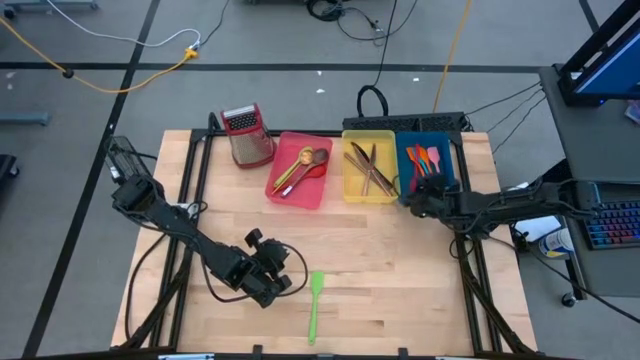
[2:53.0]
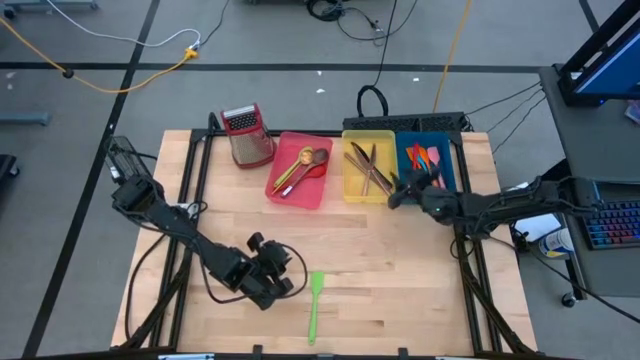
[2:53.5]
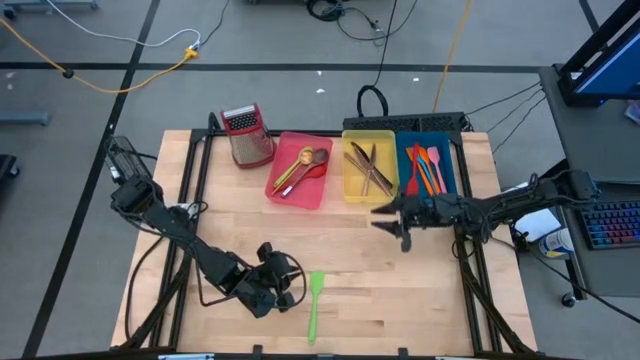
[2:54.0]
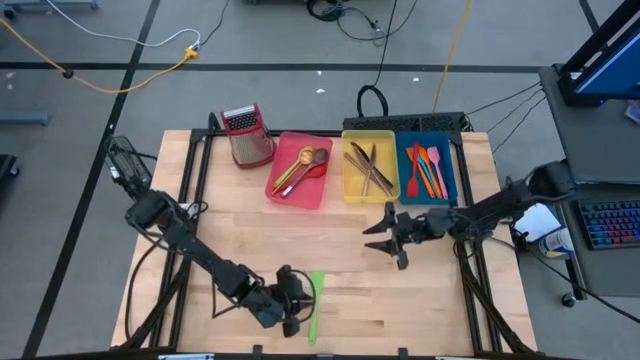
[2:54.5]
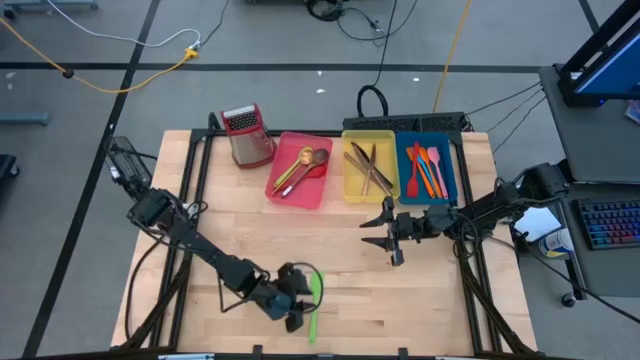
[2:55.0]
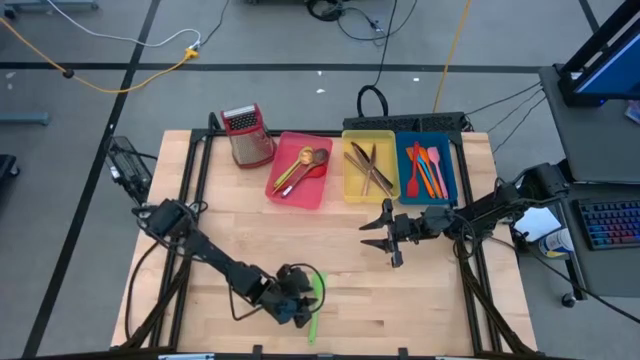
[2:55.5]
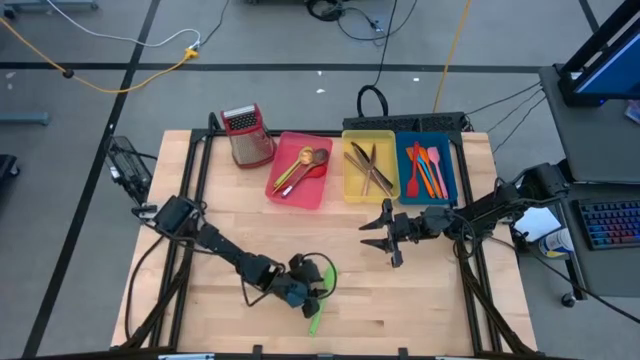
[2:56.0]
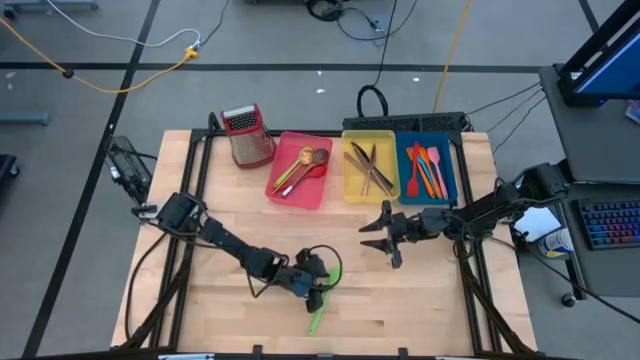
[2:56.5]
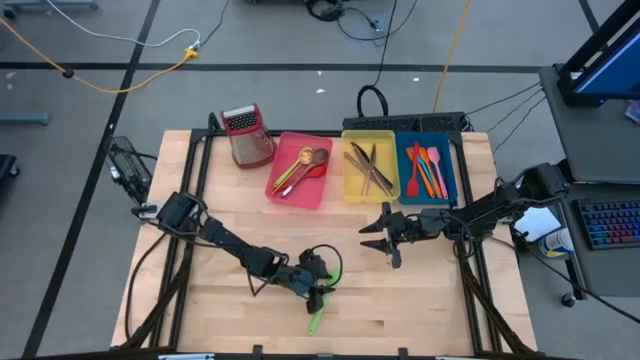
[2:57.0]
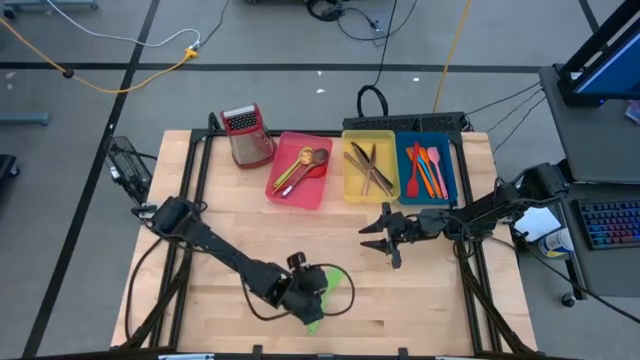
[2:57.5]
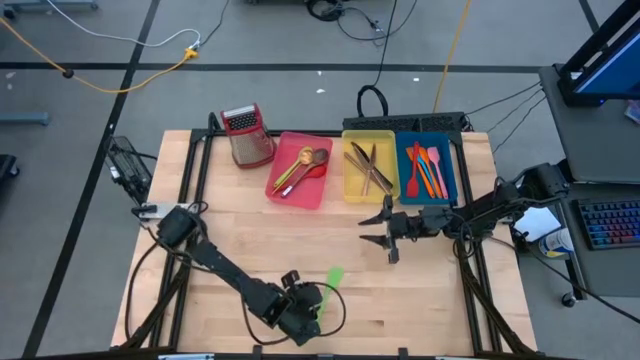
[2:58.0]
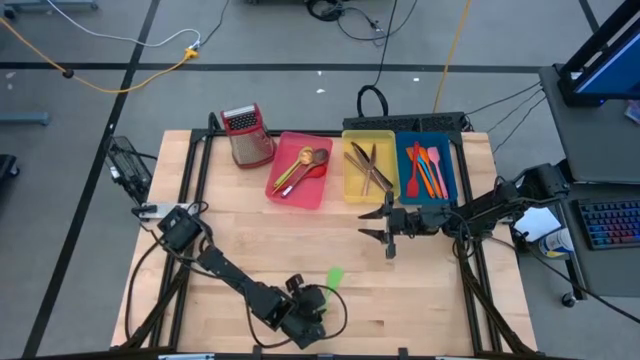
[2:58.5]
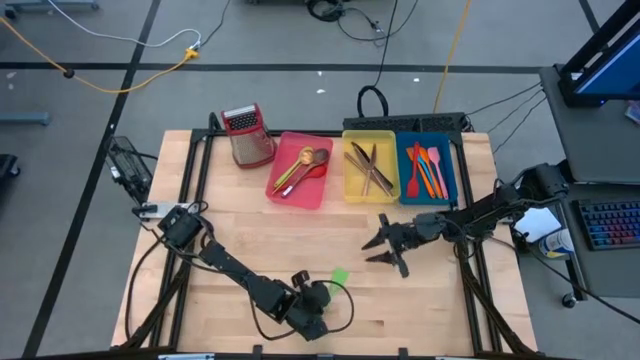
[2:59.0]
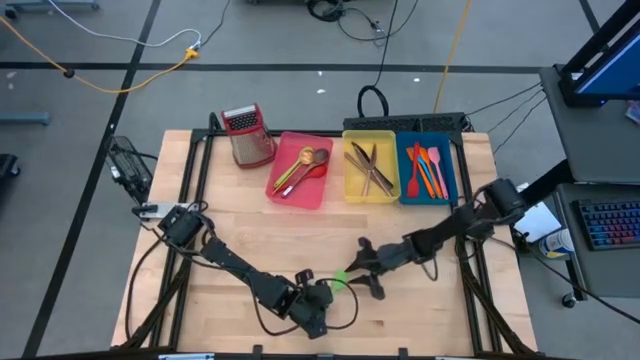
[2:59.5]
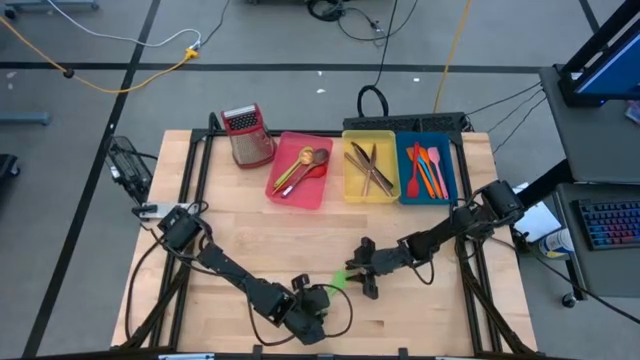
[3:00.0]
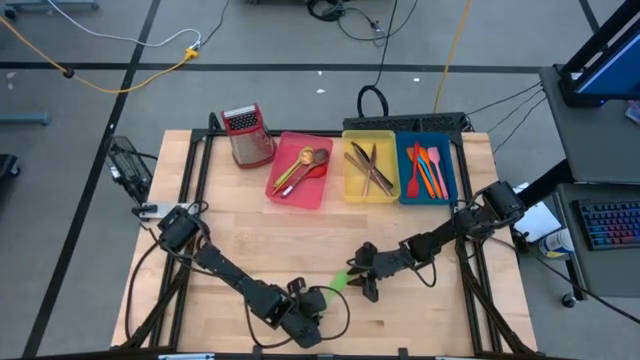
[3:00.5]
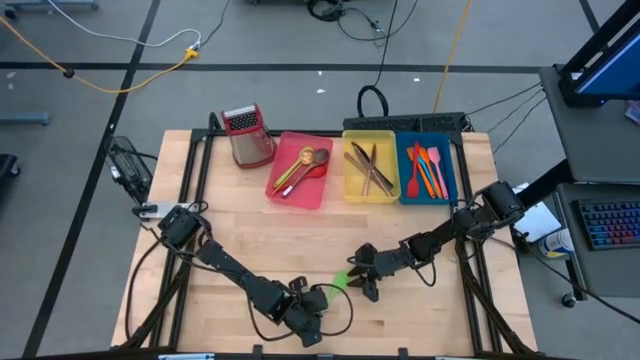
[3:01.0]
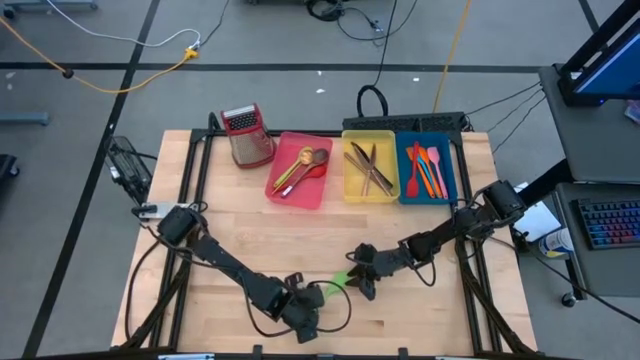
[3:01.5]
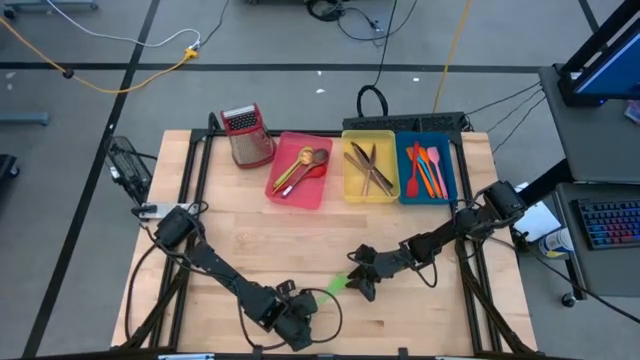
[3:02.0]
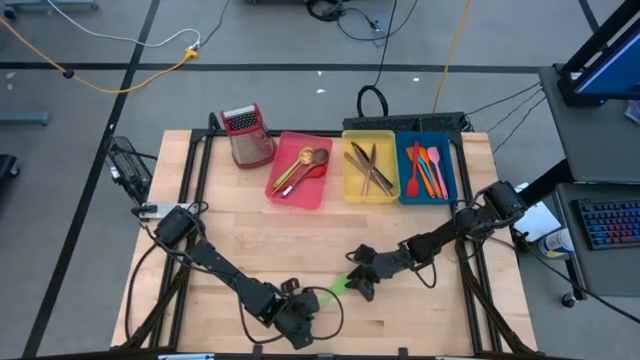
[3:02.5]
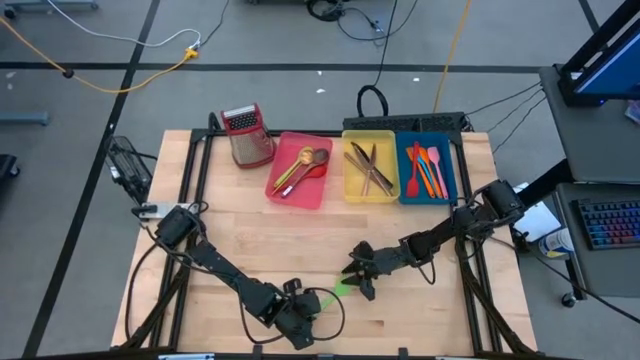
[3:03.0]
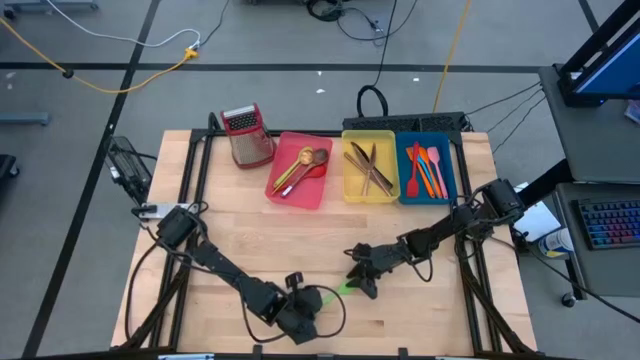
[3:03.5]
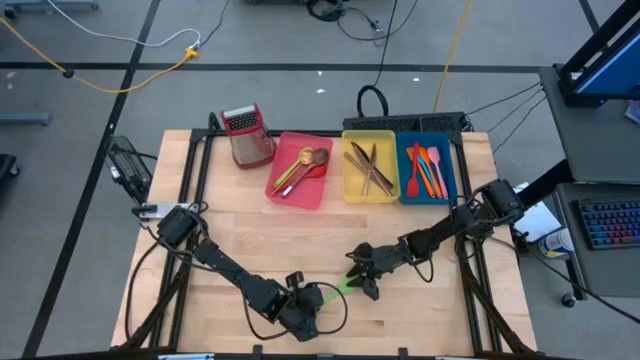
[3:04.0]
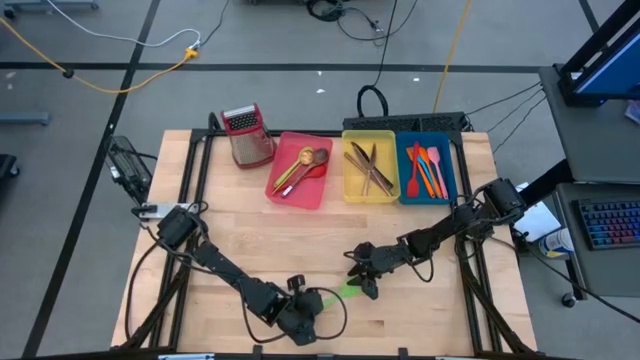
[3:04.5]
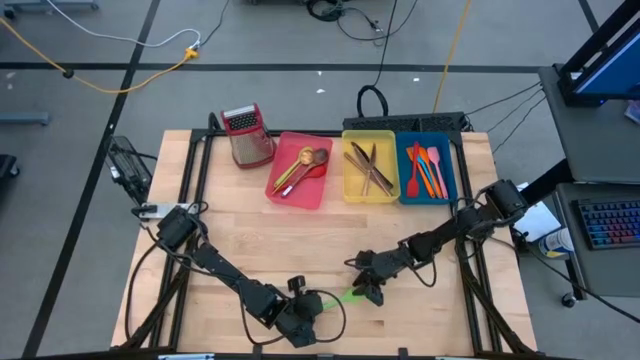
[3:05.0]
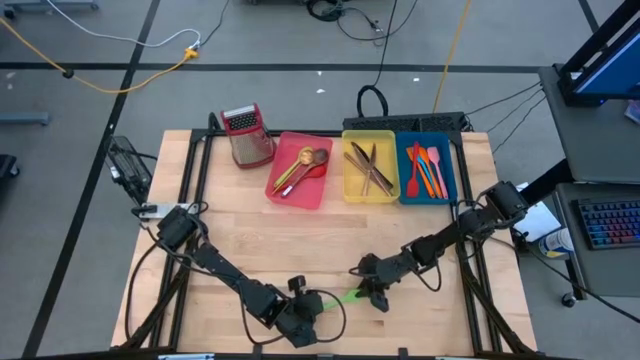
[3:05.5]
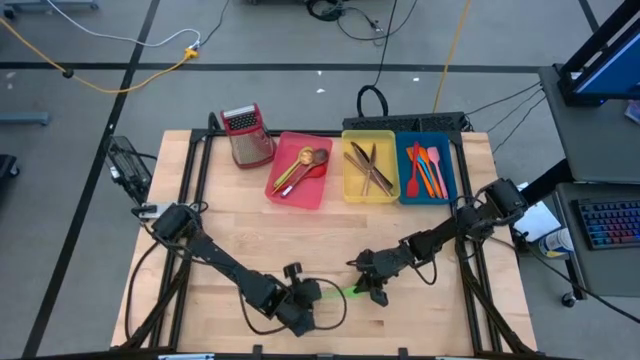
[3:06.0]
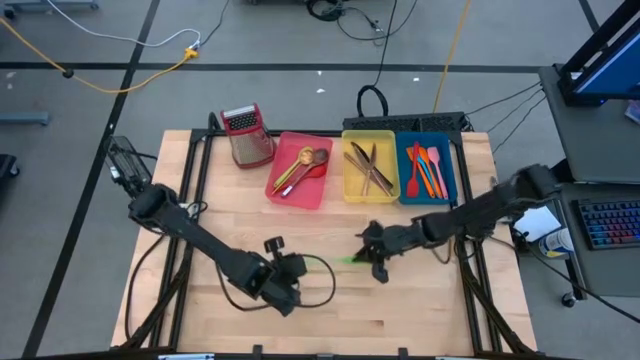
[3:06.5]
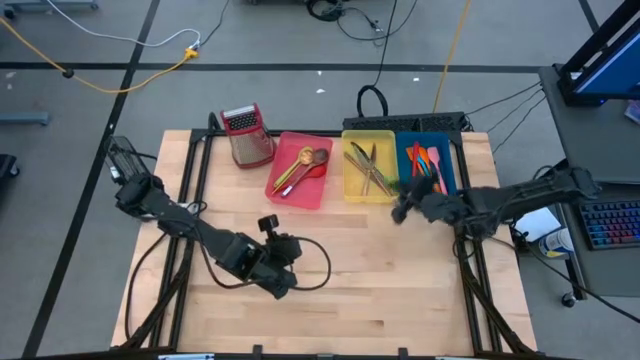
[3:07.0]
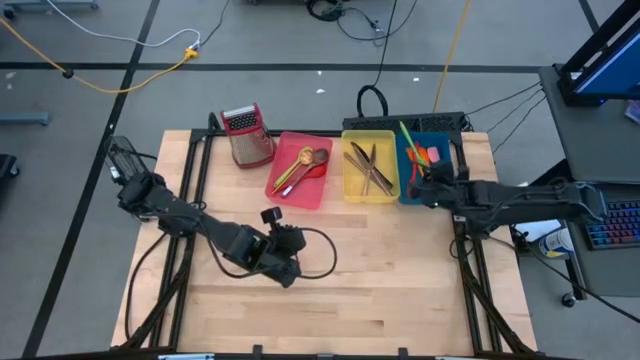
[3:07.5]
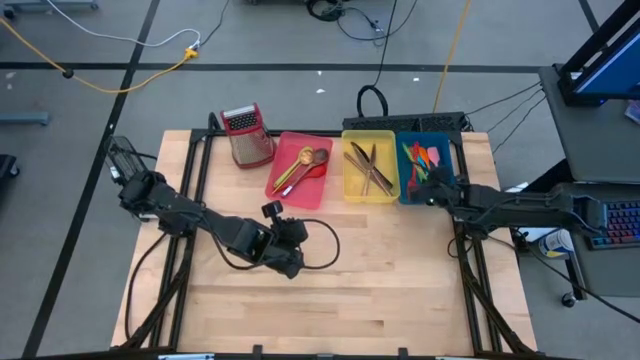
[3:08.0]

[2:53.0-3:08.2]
Task: Pick & Place Kitchen Items
Put the green serving spoon into the blue bin

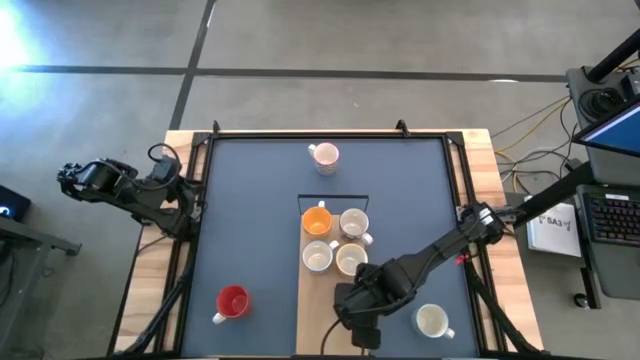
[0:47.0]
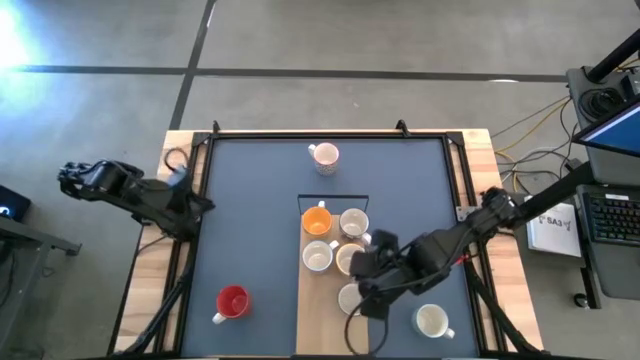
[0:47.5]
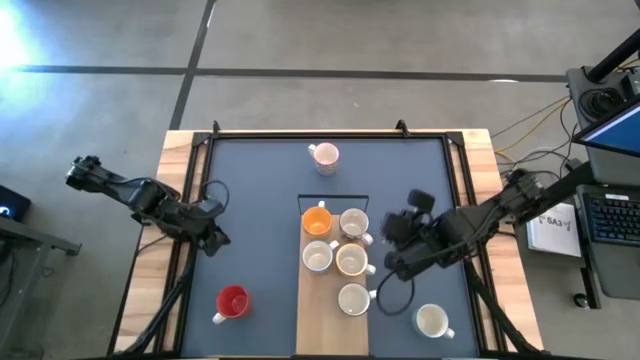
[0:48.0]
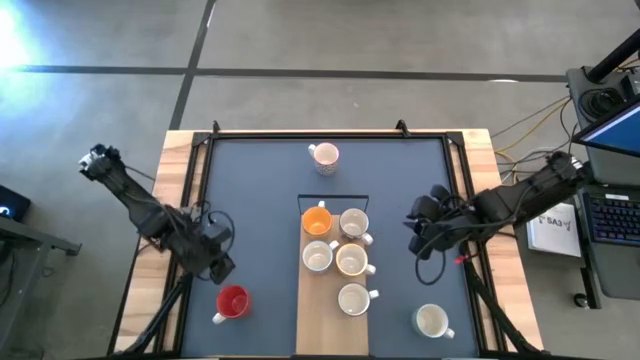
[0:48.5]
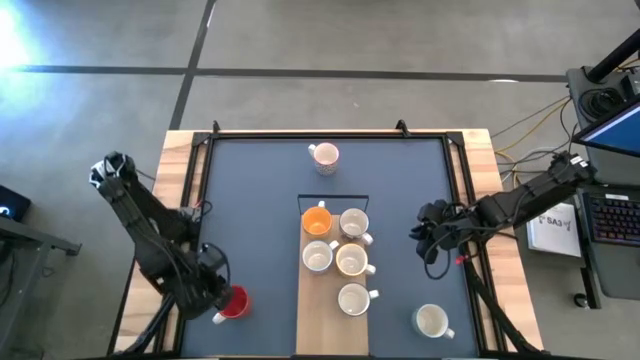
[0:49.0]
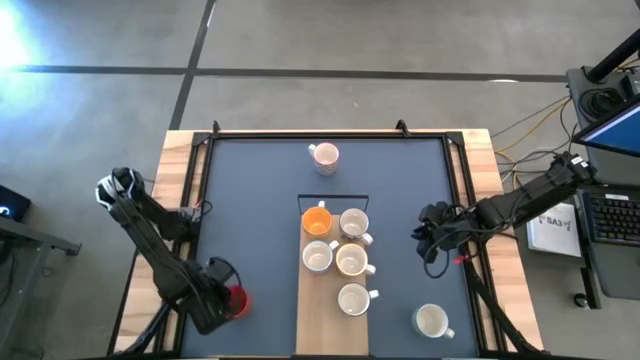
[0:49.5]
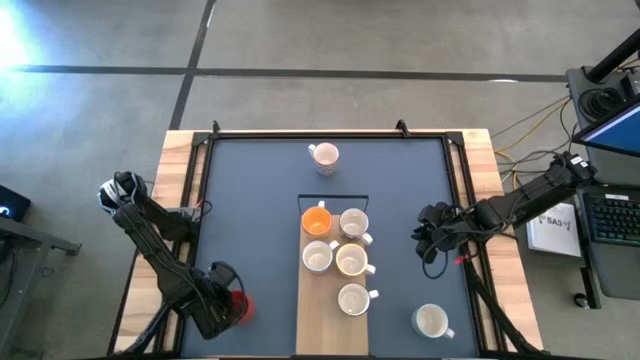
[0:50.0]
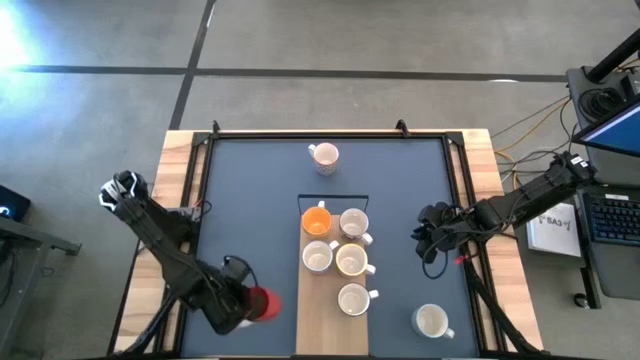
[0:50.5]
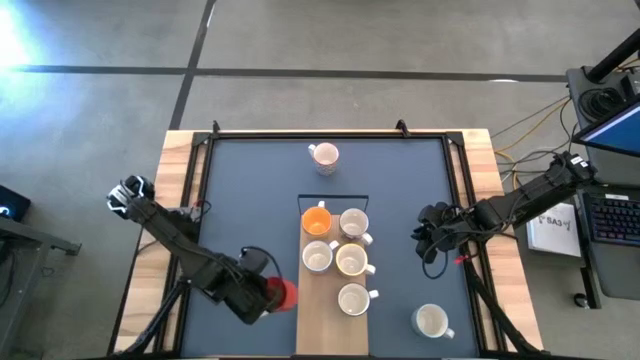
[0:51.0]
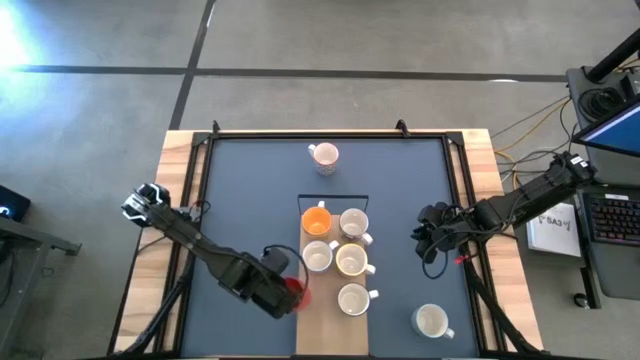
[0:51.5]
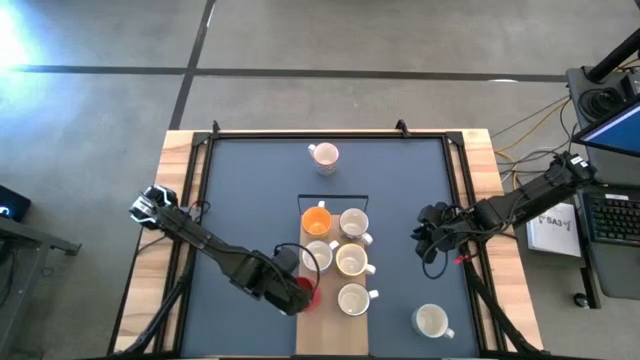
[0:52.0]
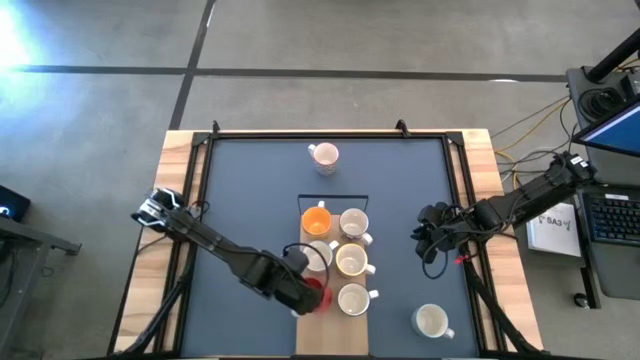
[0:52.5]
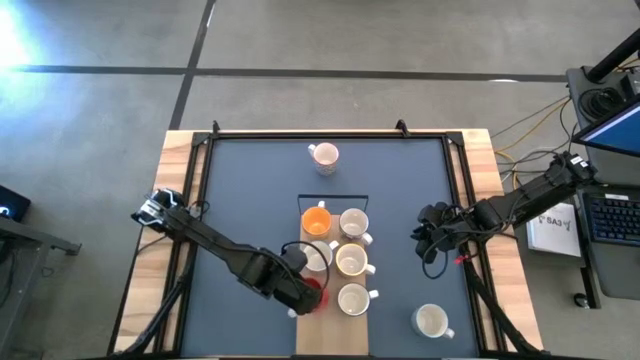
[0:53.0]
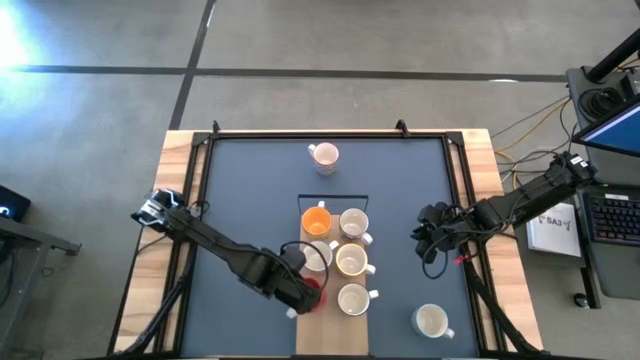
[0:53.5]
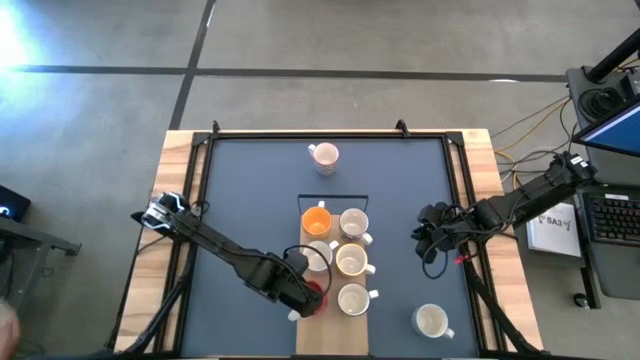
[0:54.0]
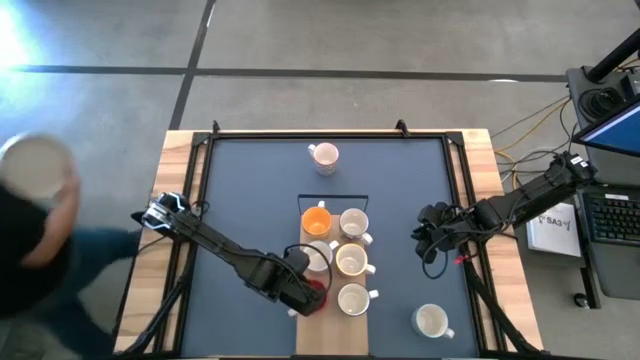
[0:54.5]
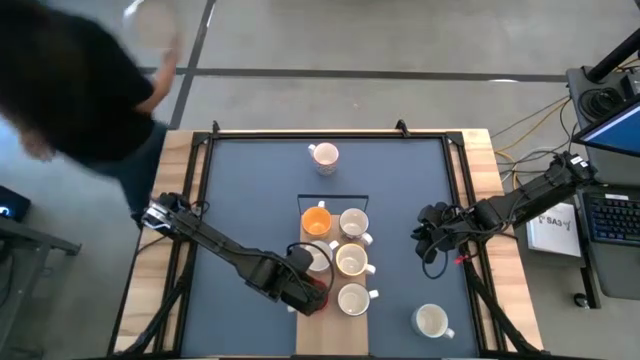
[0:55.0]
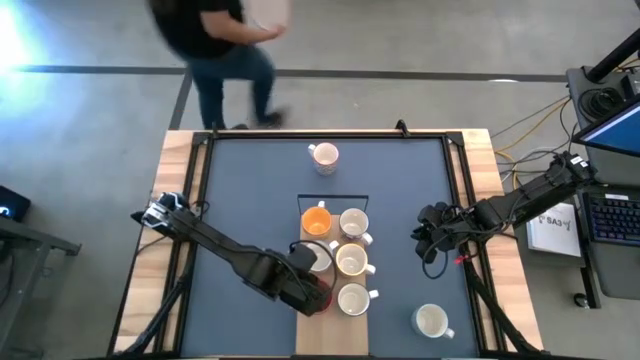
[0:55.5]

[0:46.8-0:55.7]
Task: Place coffee mugs
Put the red mug on the shelf
